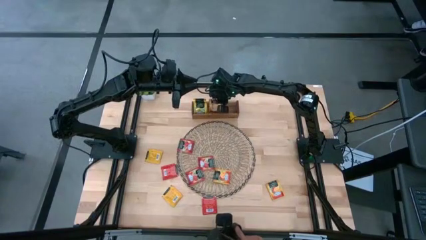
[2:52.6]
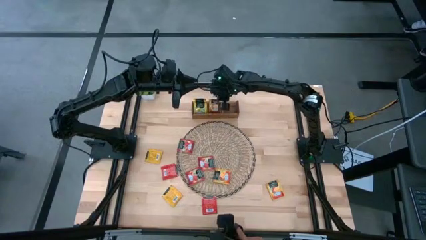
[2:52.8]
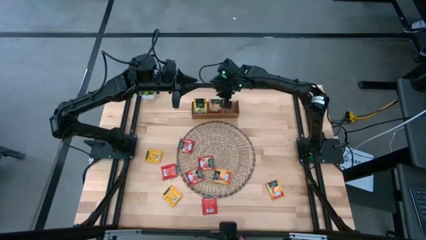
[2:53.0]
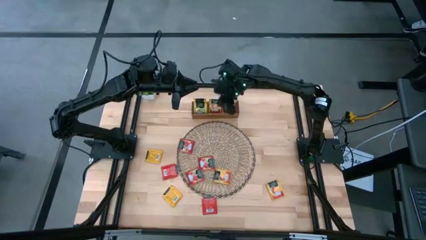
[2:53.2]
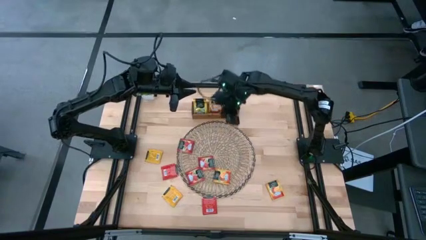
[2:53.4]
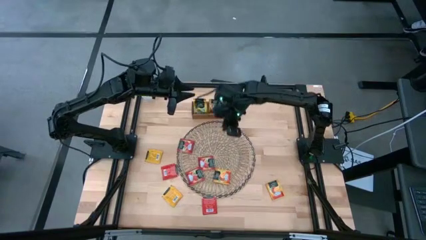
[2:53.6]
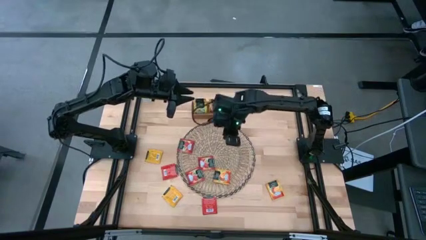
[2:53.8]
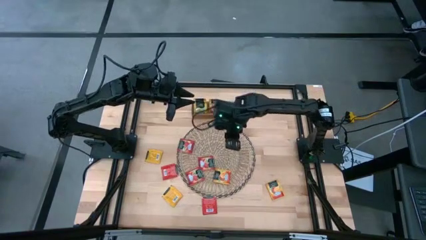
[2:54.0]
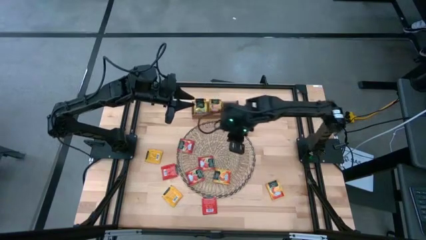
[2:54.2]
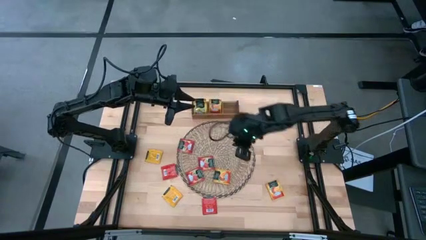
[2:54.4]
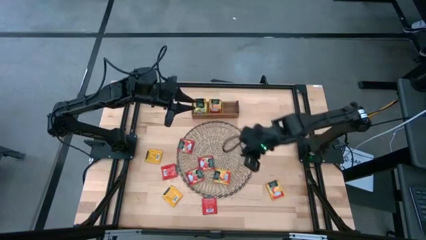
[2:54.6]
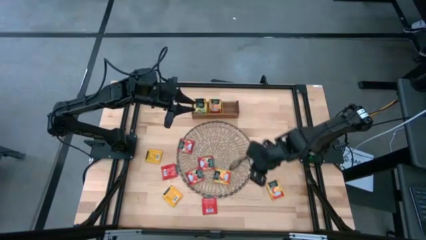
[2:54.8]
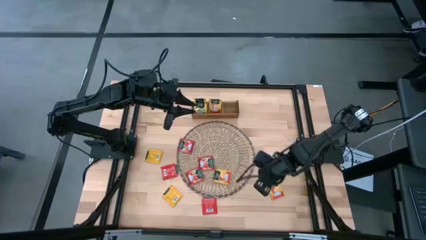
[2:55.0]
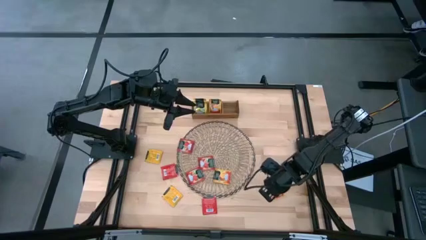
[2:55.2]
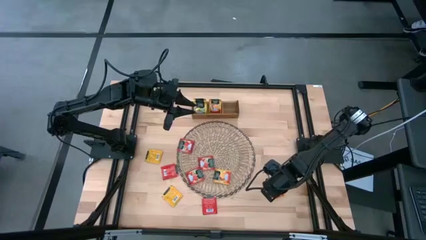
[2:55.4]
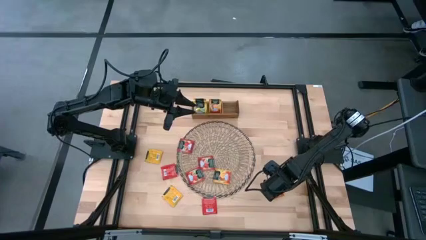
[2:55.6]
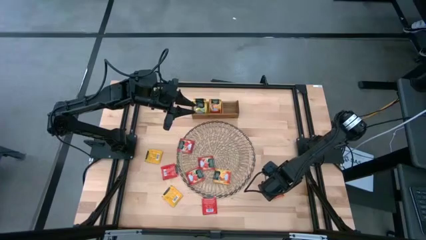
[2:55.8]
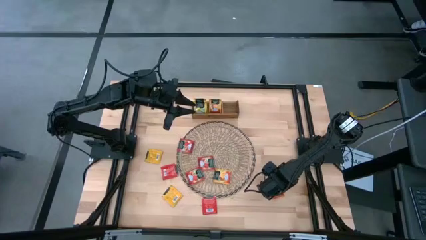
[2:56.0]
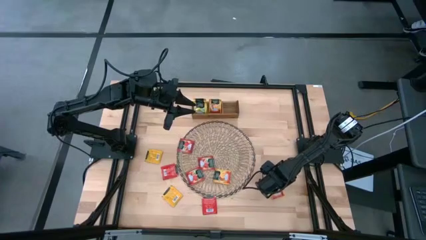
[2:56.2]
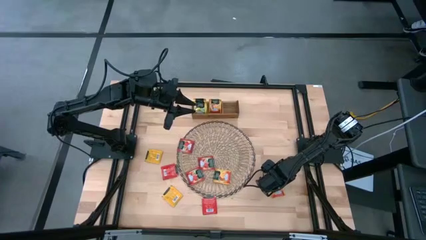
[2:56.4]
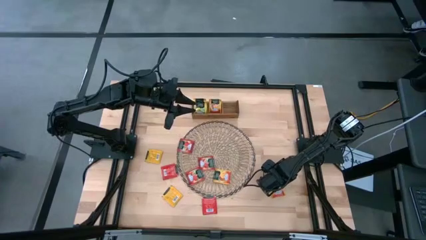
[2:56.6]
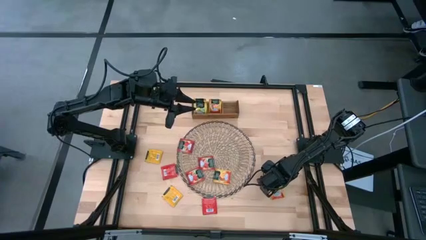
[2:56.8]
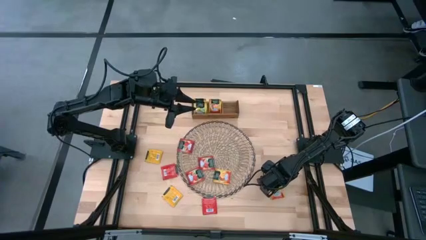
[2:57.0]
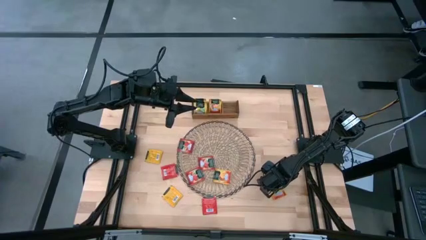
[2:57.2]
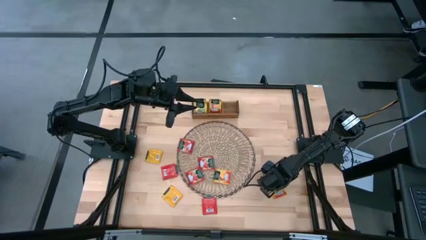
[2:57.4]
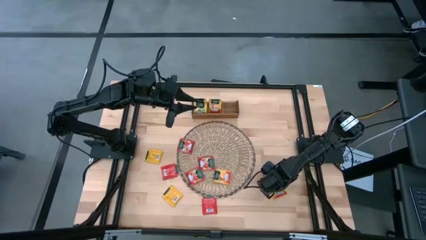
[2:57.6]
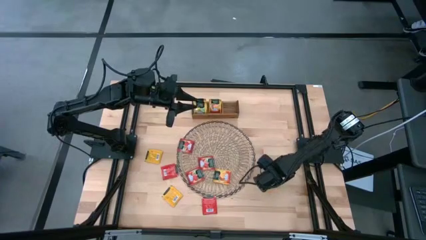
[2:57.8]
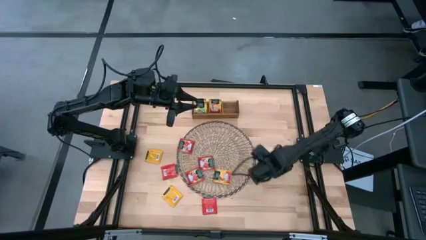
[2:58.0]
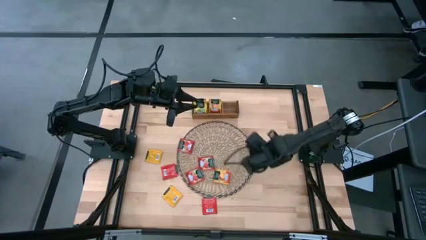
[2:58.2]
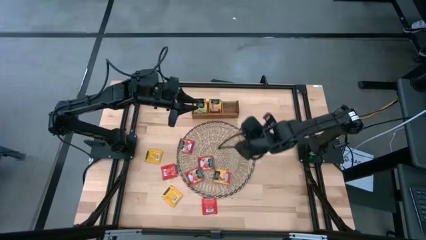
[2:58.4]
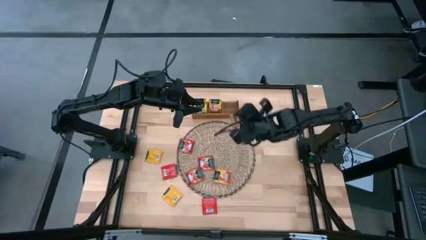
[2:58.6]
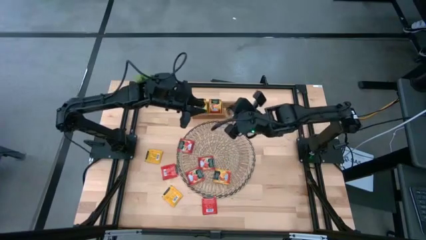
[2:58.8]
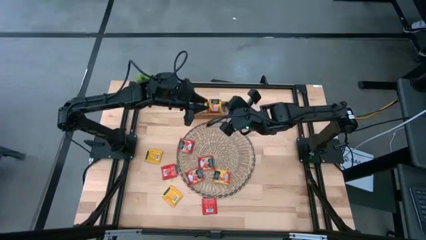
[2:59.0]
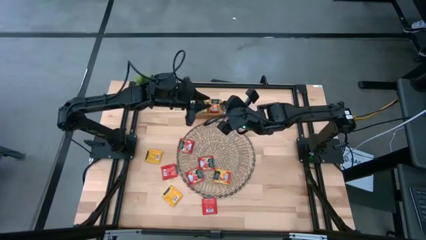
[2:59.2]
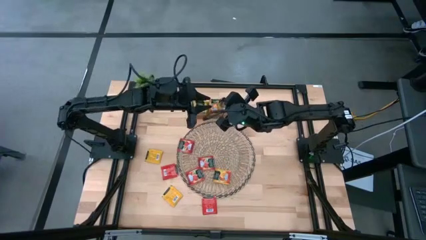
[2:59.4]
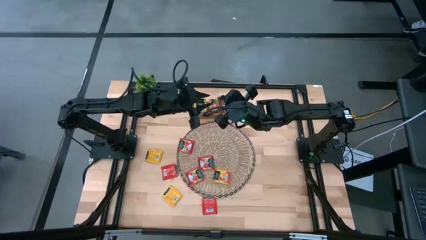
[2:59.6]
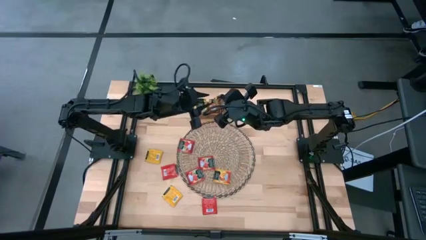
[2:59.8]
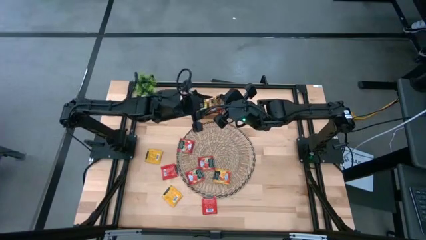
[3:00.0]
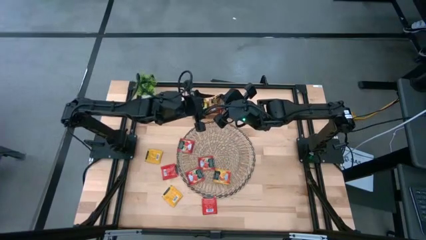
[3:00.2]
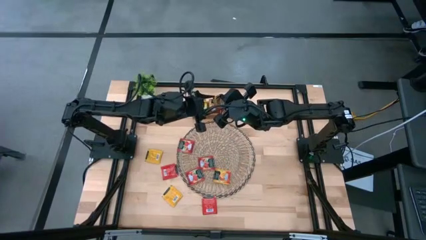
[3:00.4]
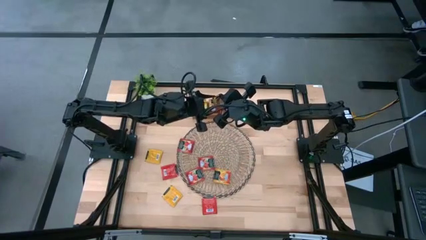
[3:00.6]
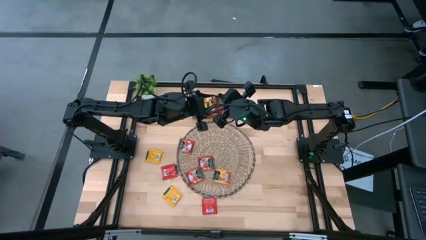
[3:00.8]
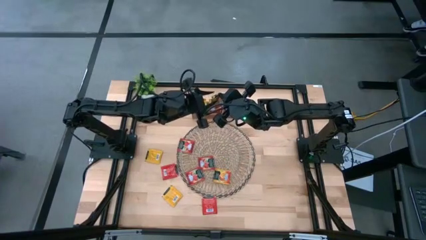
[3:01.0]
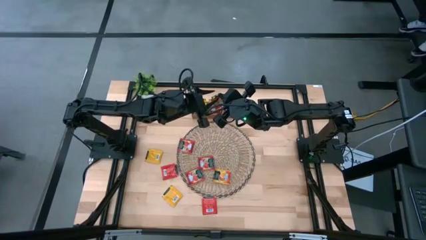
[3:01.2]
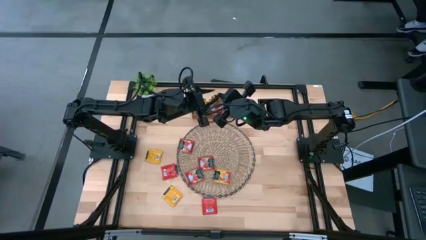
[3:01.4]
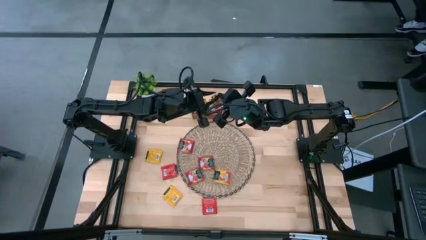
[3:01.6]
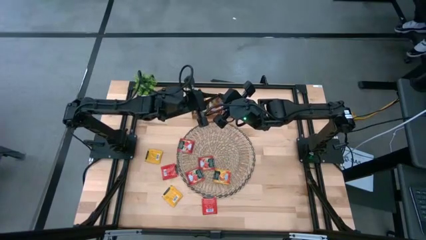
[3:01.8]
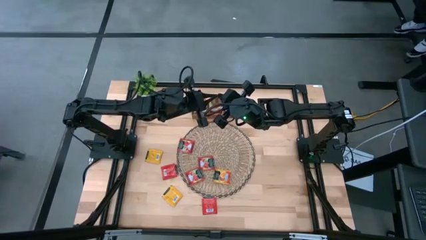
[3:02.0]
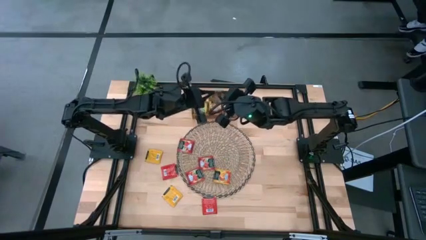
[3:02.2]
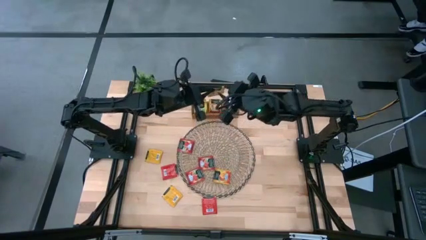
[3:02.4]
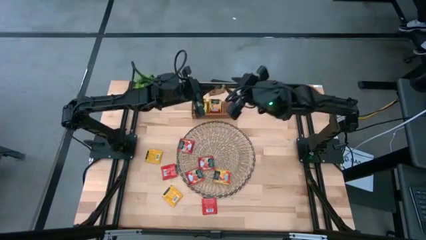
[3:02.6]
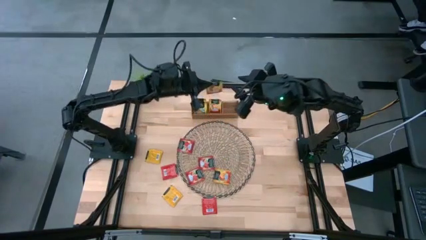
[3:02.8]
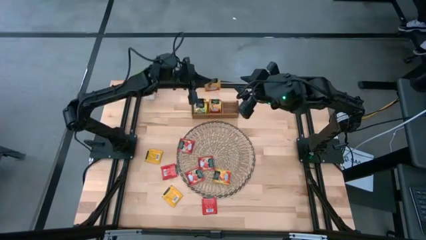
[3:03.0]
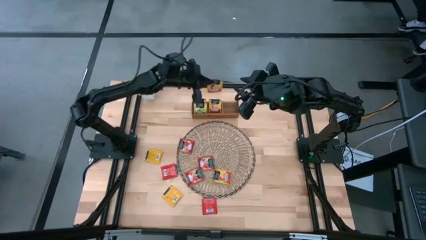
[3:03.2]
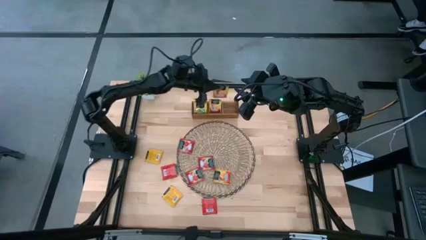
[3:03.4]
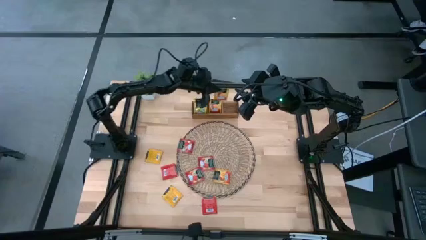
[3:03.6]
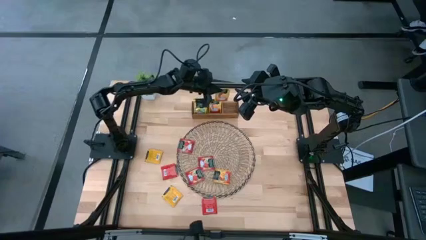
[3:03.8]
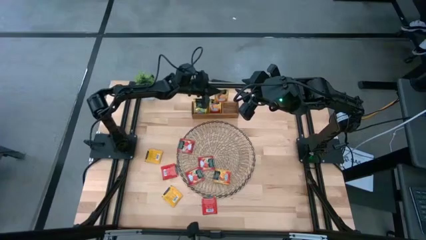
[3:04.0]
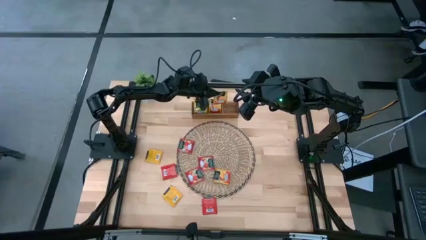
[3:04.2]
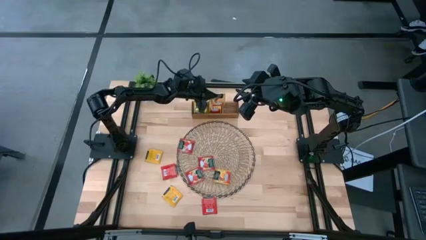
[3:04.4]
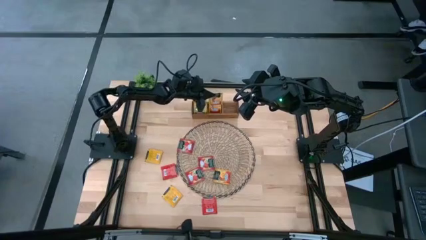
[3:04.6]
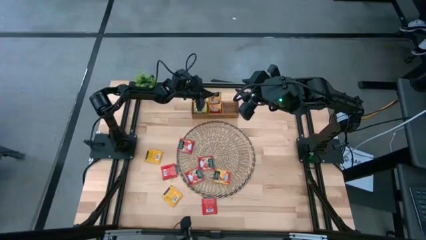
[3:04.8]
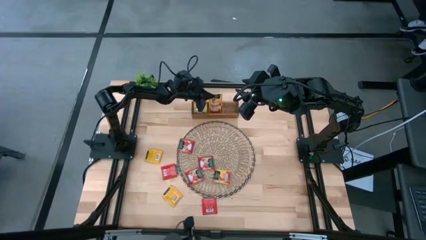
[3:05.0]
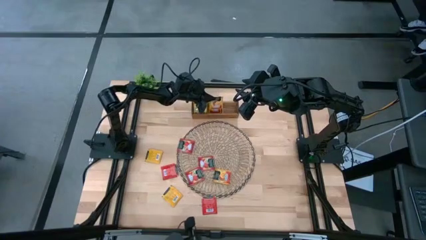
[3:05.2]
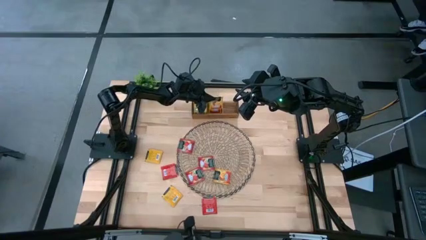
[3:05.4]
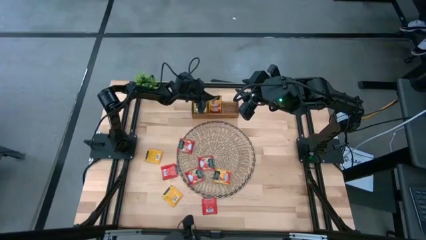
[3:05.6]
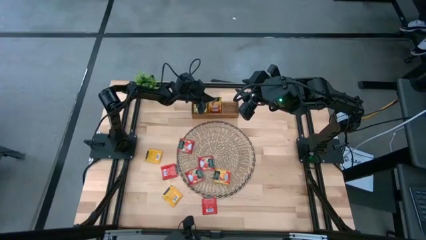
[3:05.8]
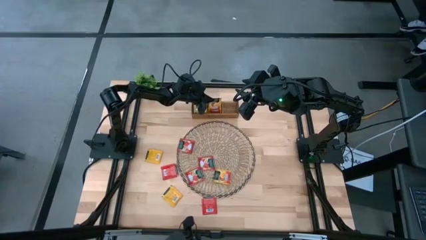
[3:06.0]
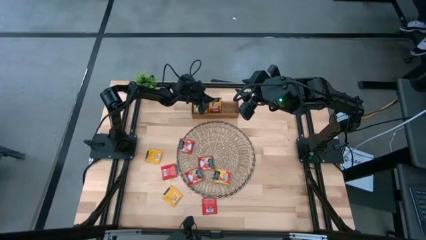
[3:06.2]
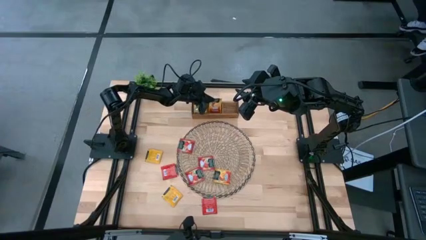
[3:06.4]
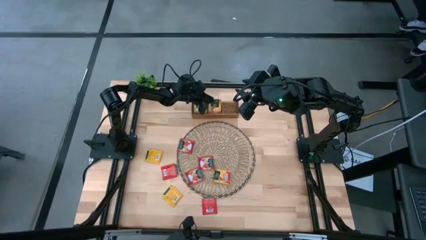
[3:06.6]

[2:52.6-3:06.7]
Task: Pick & Place Tea
Put the orange tea bag into the middle of the wooden organizer
